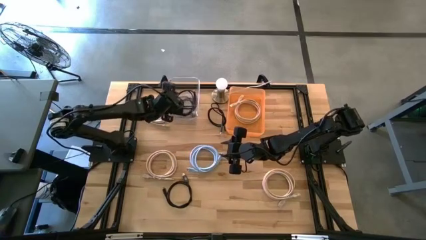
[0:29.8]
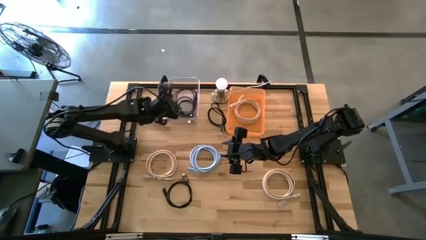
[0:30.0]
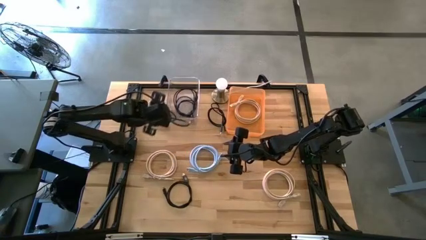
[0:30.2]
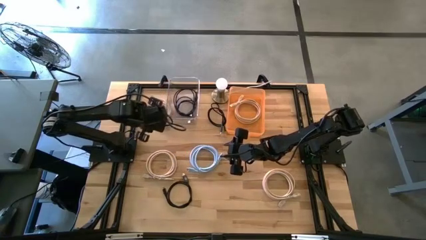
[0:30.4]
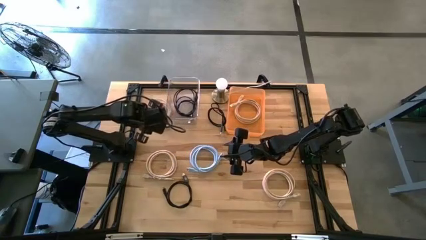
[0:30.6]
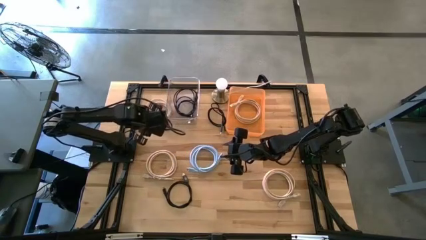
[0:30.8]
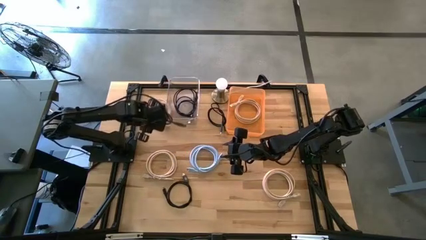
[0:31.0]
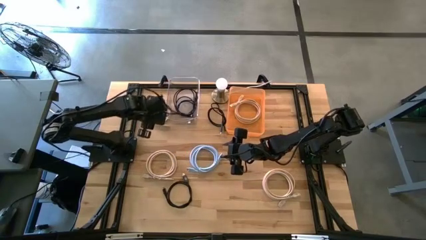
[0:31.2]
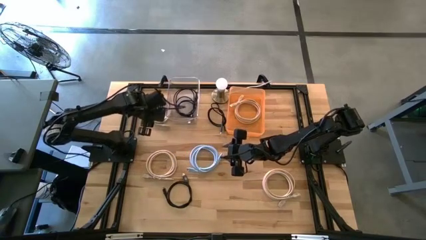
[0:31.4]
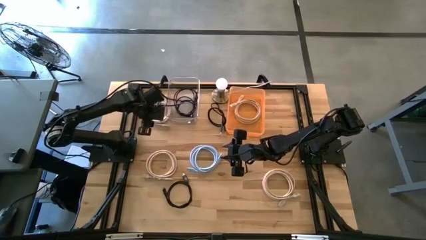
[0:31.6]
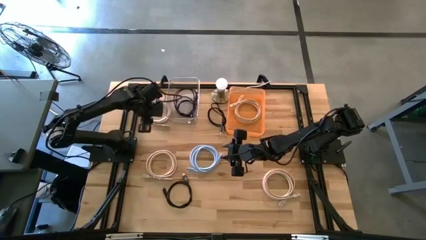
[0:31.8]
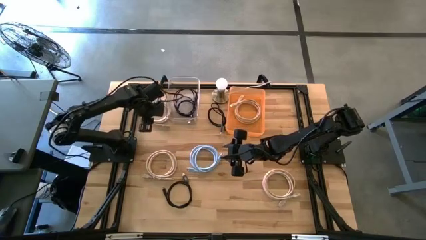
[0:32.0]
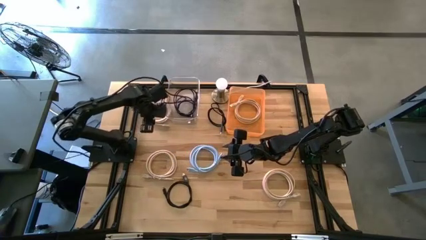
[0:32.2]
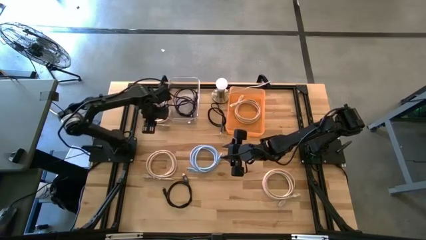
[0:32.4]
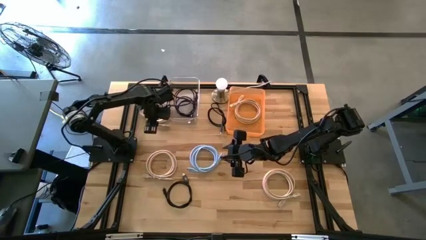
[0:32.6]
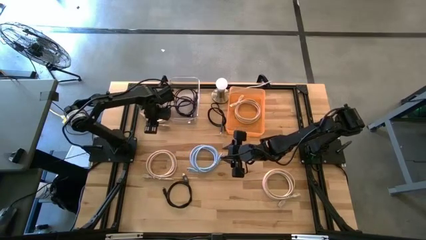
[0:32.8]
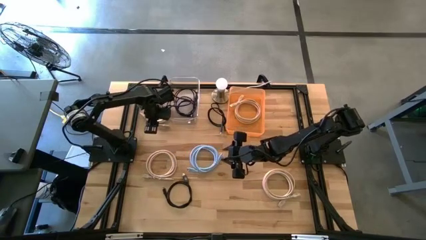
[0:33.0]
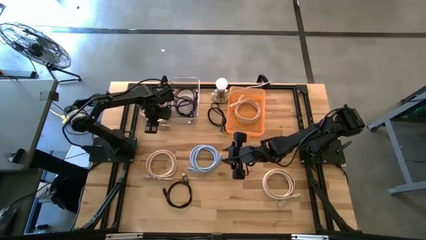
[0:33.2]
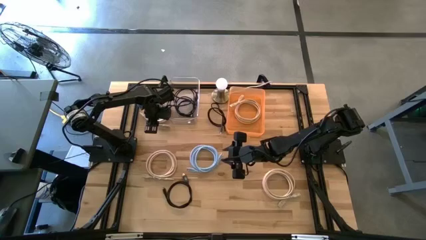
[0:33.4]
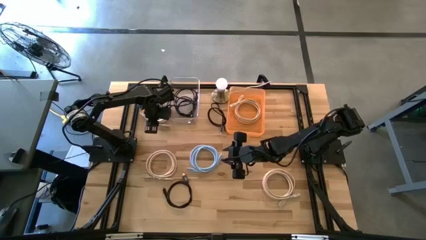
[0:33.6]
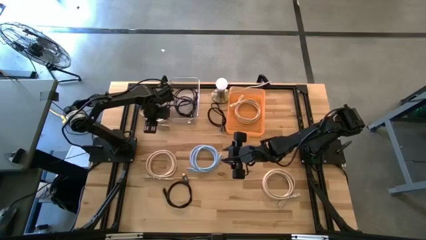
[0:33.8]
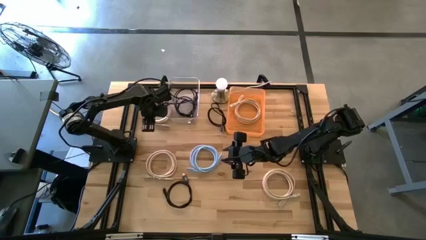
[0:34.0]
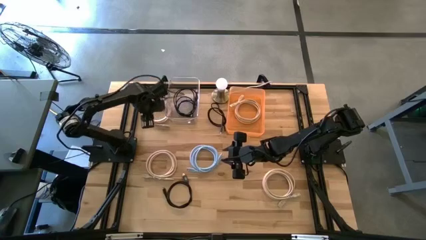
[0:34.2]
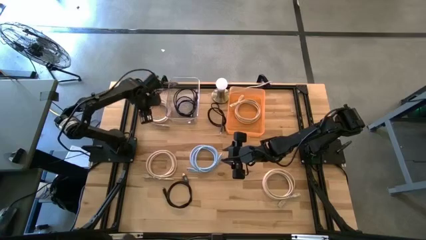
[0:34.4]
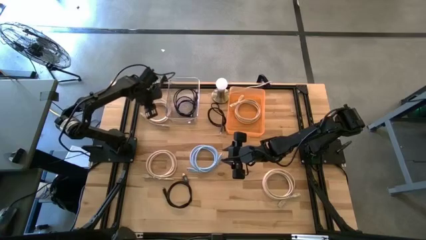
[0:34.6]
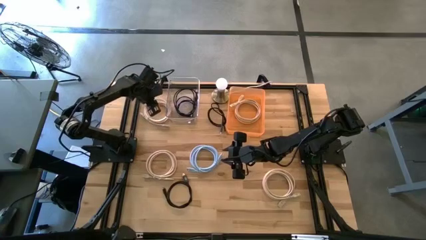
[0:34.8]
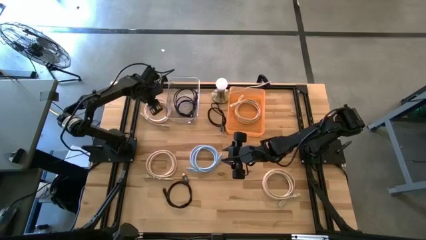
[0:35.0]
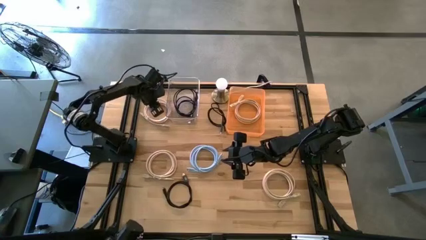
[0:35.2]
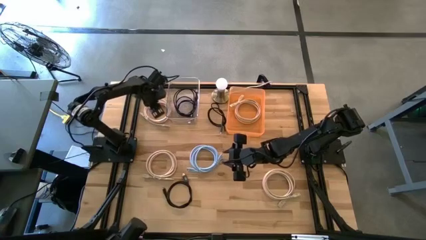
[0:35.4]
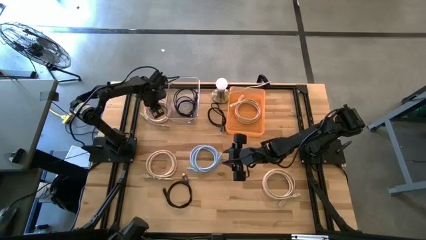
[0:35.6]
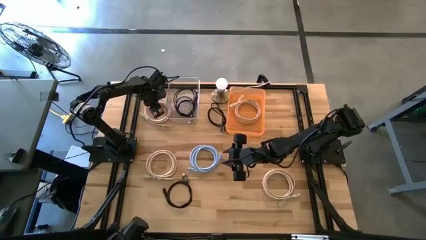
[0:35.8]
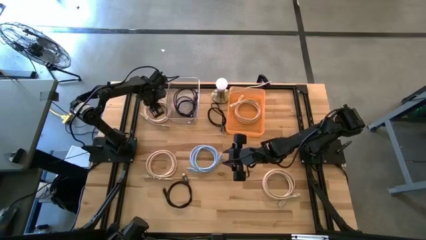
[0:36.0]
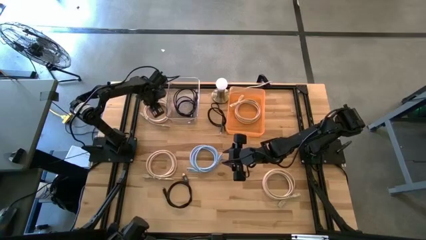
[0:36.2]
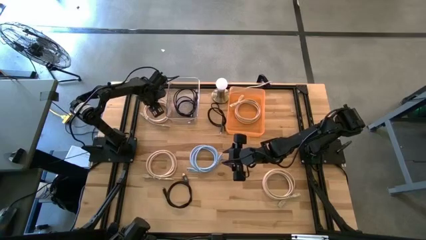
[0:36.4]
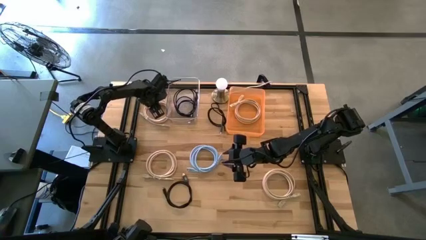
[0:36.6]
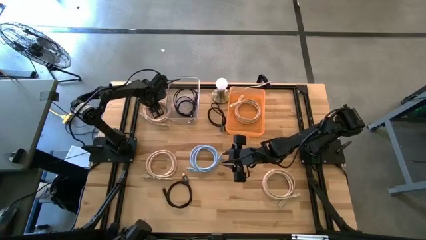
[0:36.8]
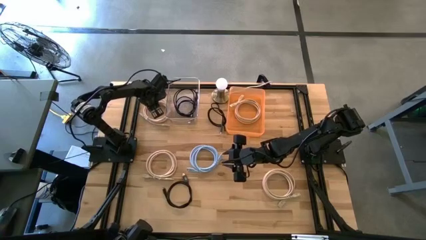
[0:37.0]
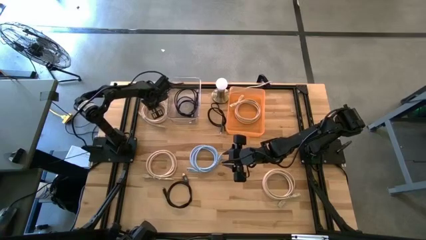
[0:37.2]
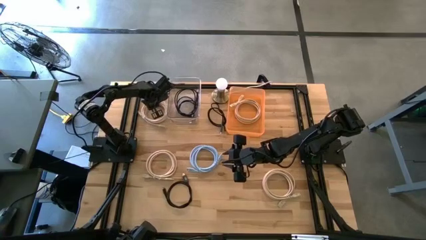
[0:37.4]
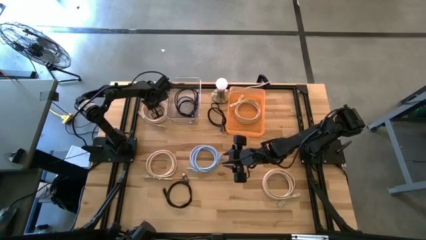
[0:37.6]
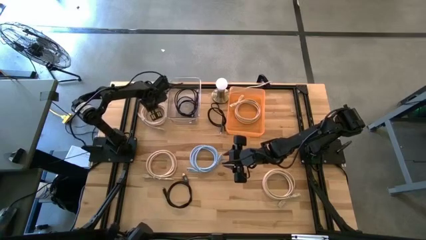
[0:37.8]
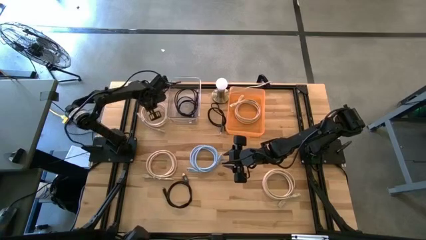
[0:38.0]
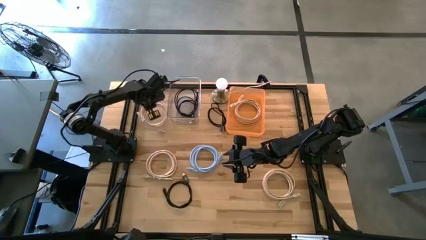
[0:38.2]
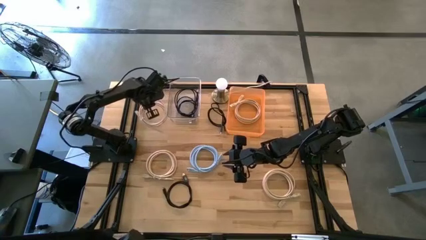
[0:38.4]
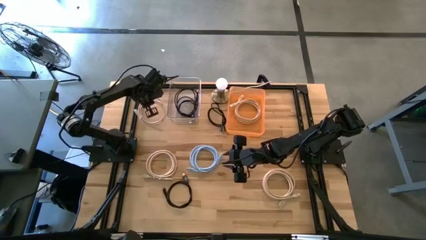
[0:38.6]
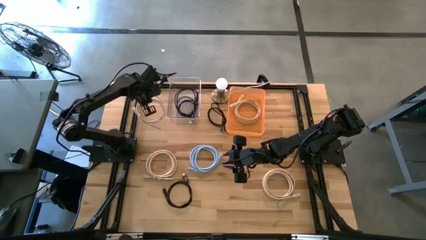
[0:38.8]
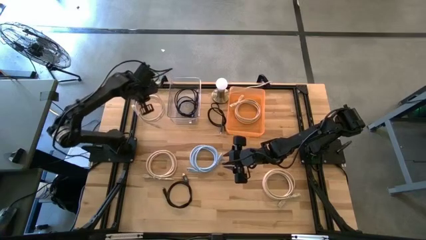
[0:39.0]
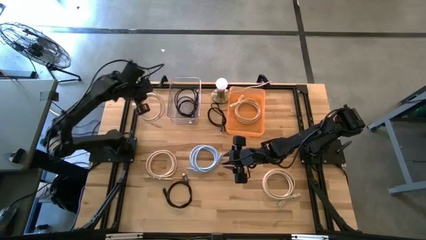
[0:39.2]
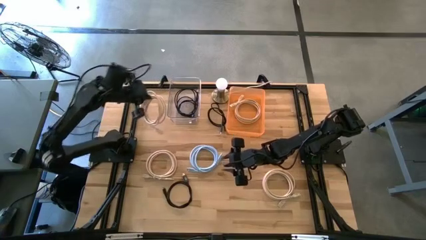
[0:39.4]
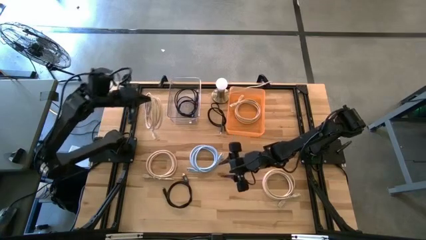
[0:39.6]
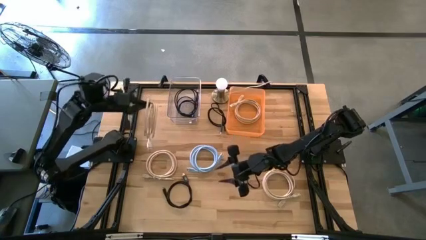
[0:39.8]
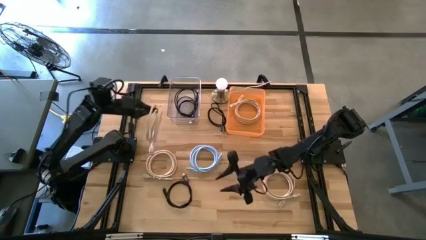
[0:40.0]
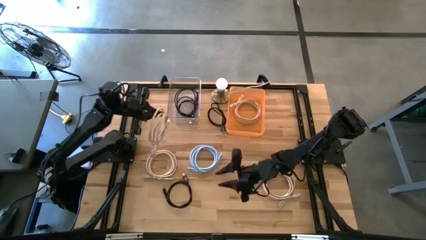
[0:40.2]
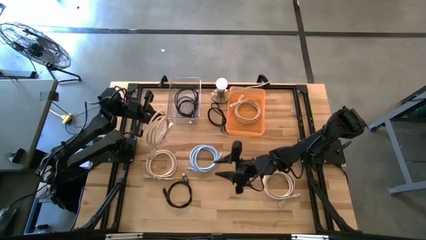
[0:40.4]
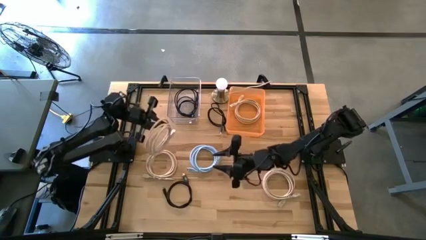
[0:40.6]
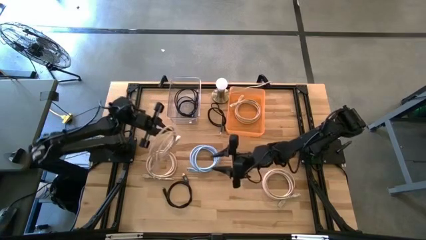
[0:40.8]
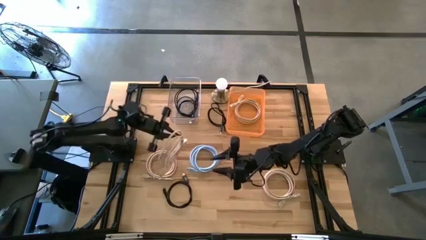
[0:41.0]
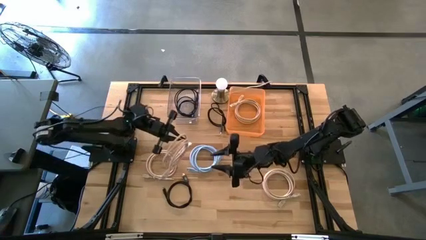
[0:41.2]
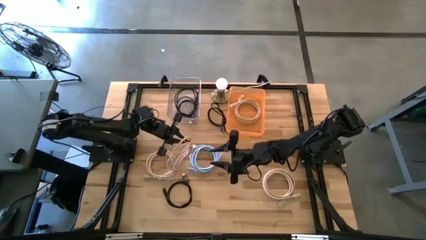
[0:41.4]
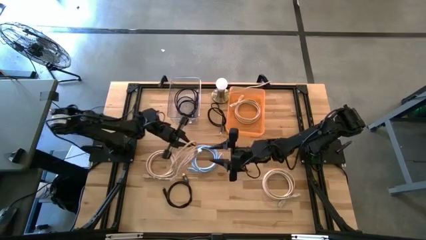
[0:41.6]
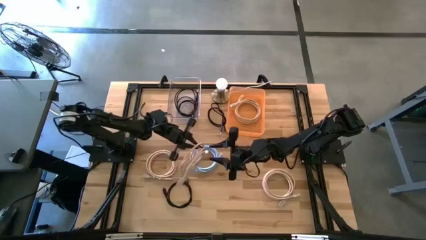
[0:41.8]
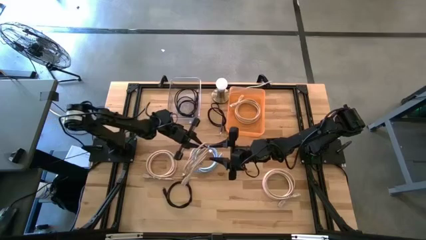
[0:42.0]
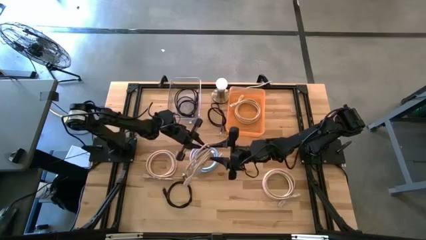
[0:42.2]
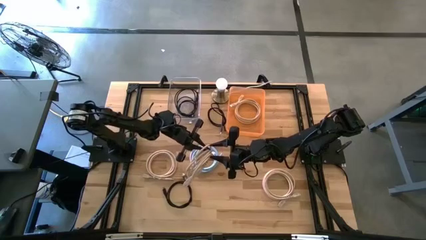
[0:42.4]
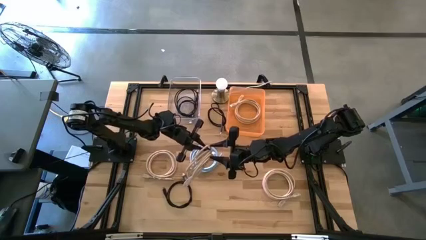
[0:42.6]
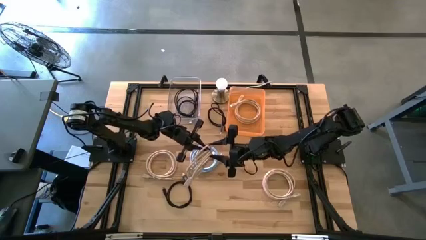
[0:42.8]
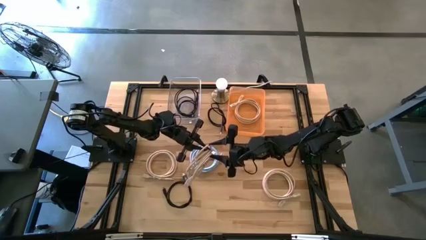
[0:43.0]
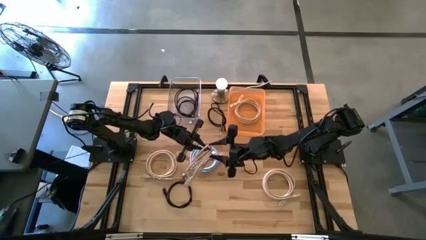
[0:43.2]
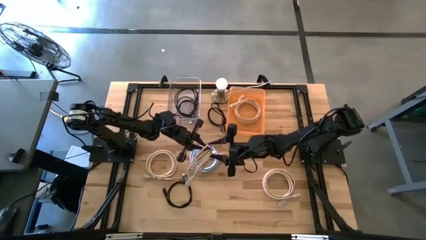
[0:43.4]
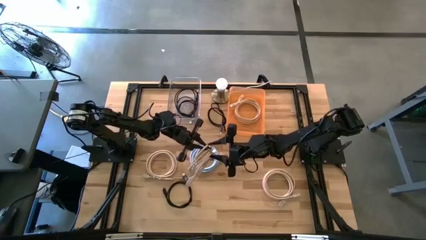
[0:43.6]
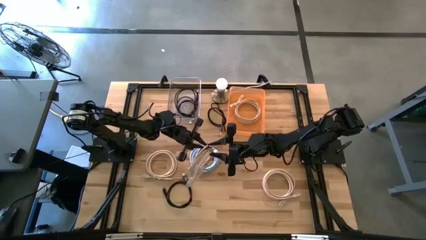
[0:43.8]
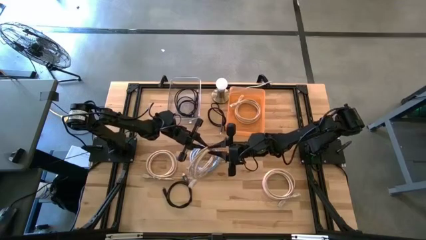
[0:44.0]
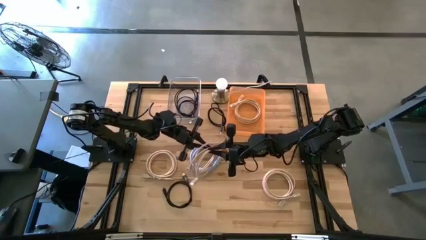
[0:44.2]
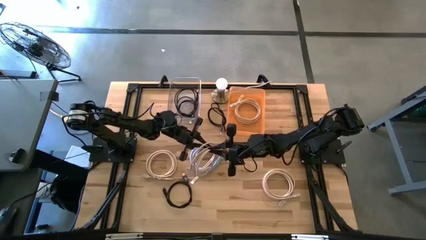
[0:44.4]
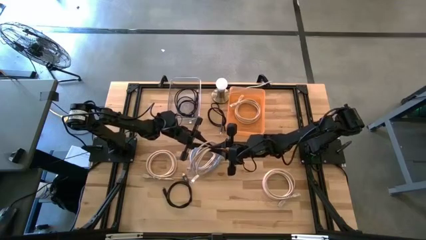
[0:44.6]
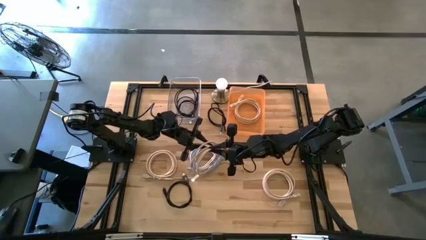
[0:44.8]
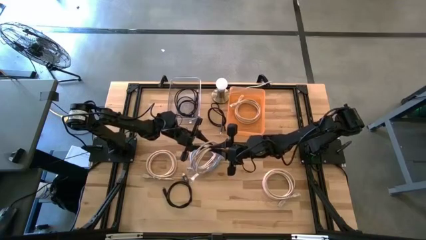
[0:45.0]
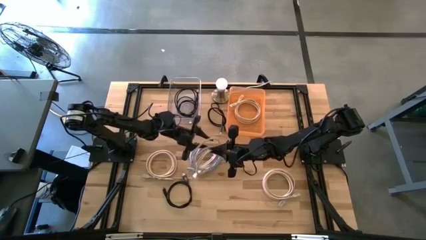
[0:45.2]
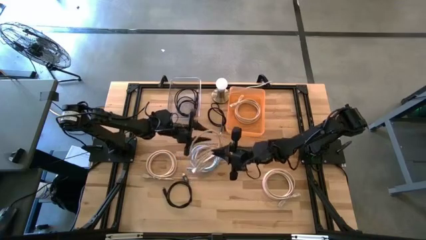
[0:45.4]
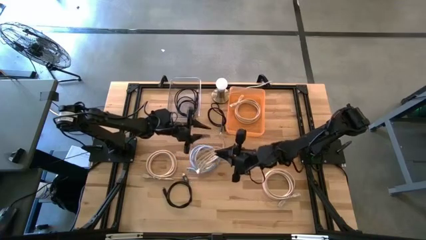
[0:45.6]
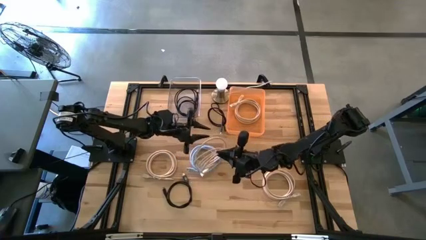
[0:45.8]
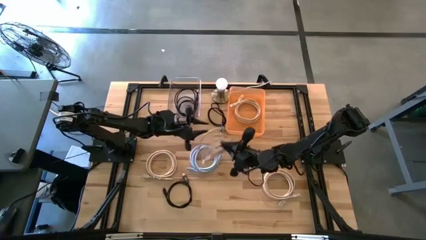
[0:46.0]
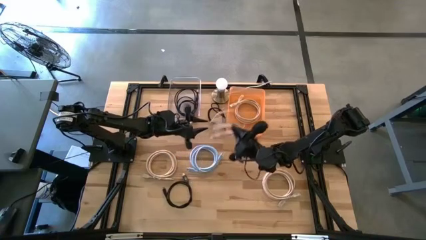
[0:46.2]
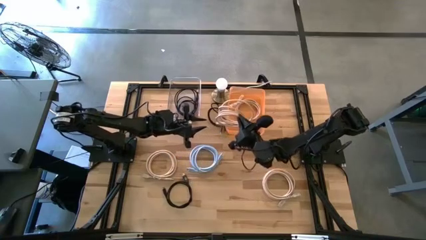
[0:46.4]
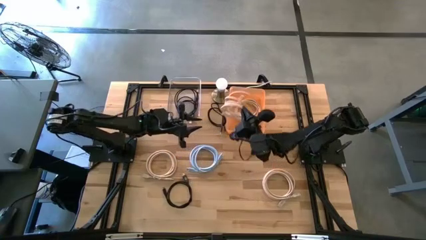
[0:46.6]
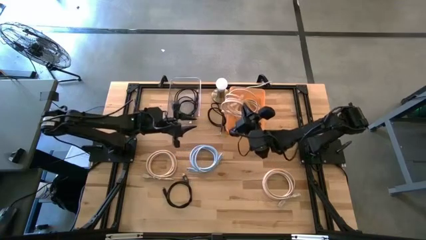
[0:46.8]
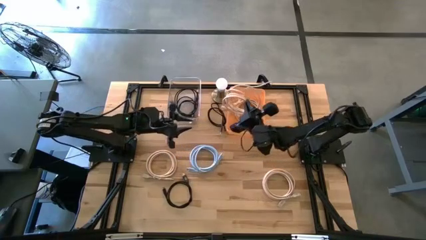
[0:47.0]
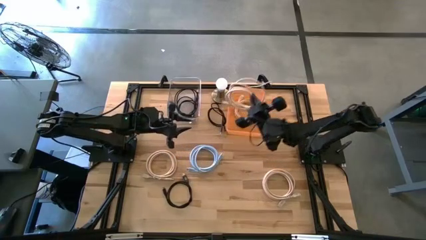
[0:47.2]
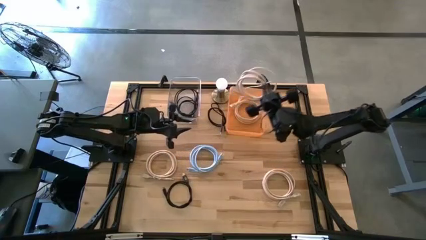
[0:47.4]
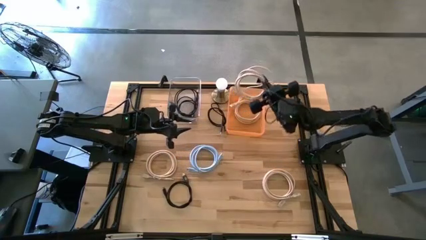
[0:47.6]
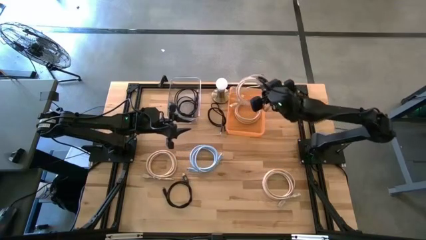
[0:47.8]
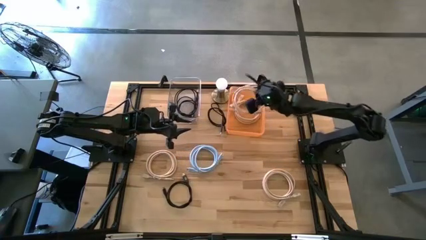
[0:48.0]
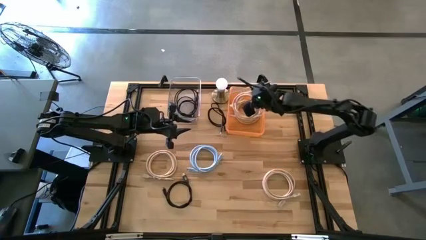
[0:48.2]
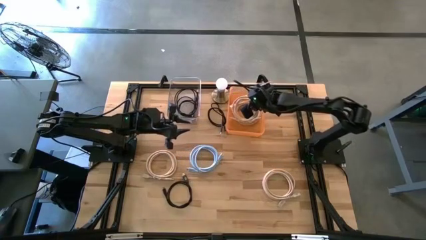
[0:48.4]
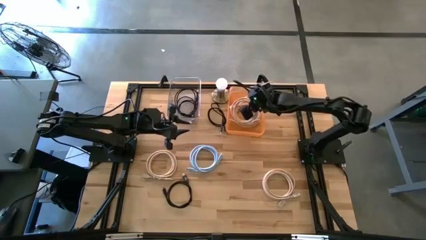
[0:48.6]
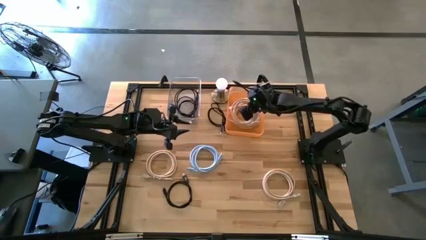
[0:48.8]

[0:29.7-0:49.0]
Task: Pick & Place USB Port
Put the light brown charger cable into the orange bin
